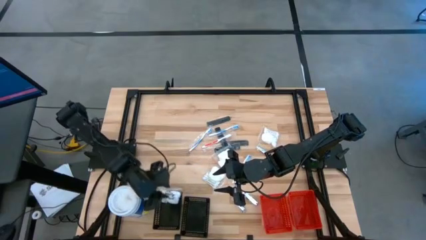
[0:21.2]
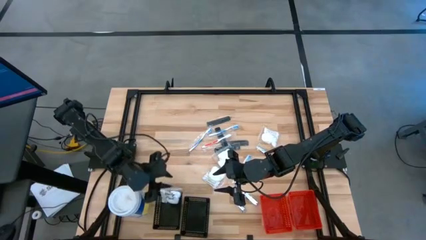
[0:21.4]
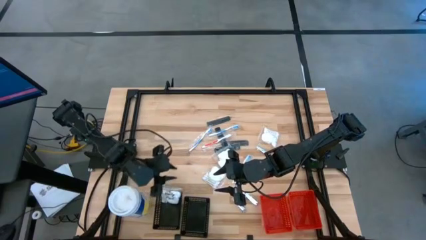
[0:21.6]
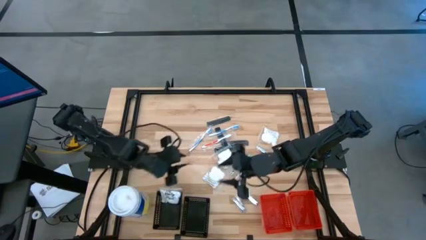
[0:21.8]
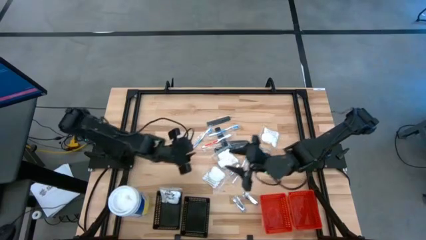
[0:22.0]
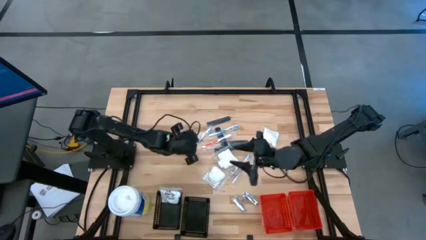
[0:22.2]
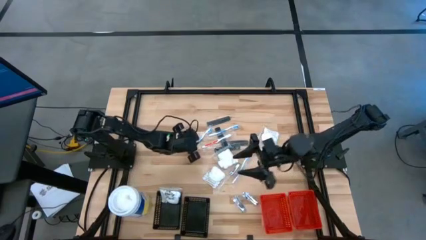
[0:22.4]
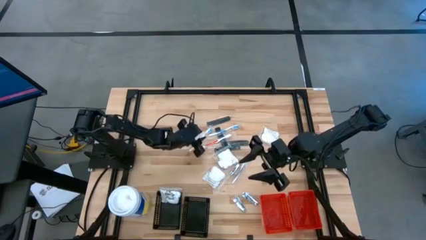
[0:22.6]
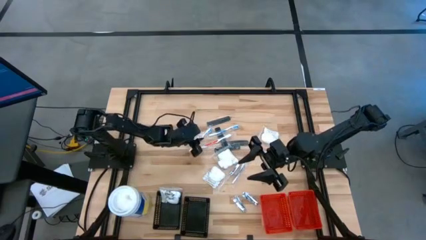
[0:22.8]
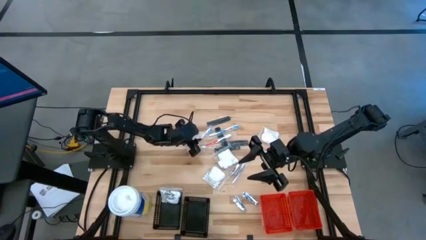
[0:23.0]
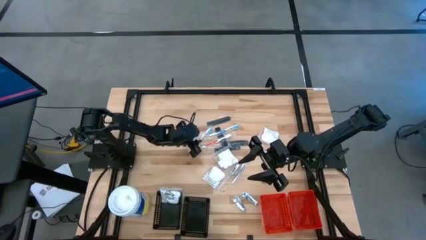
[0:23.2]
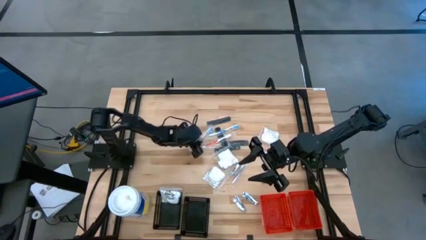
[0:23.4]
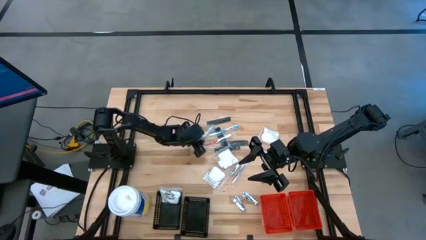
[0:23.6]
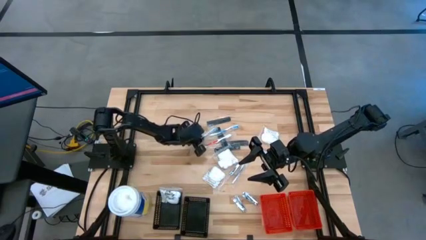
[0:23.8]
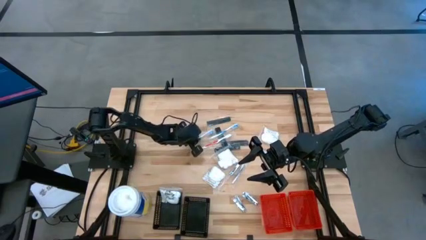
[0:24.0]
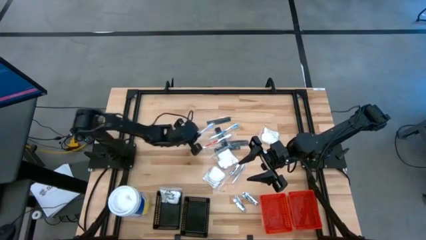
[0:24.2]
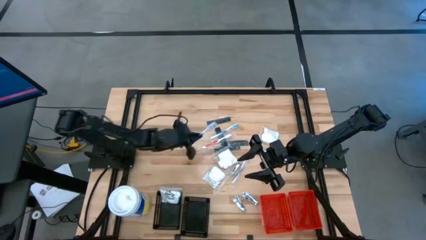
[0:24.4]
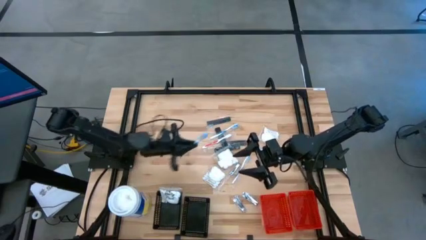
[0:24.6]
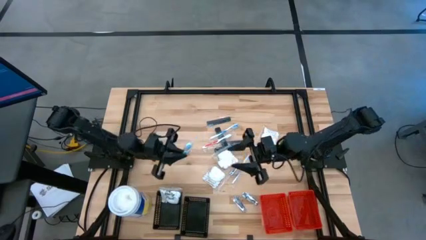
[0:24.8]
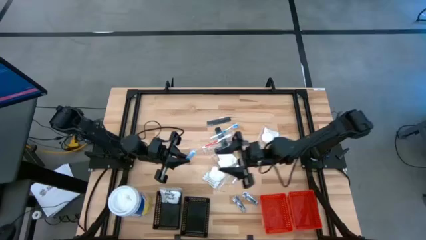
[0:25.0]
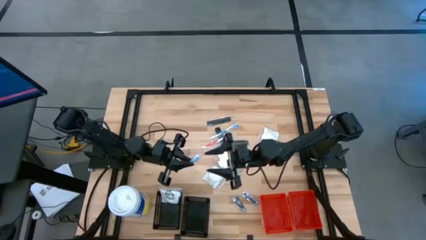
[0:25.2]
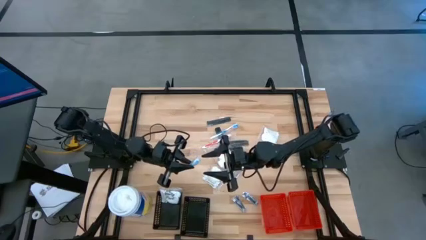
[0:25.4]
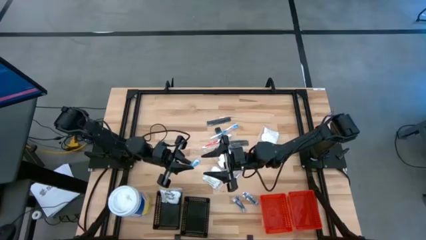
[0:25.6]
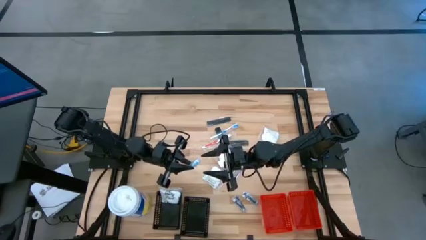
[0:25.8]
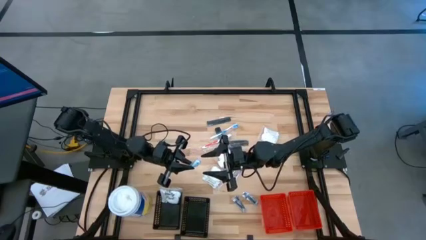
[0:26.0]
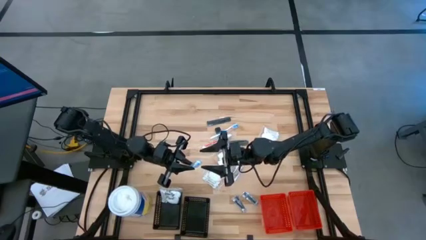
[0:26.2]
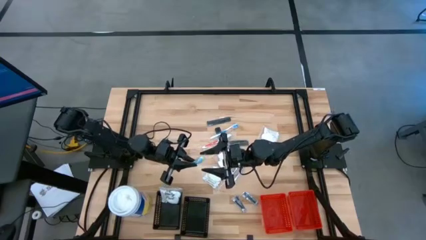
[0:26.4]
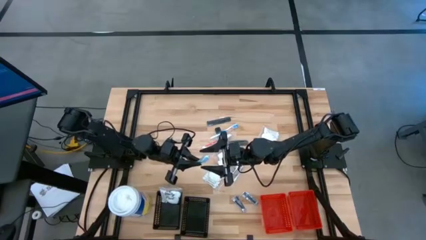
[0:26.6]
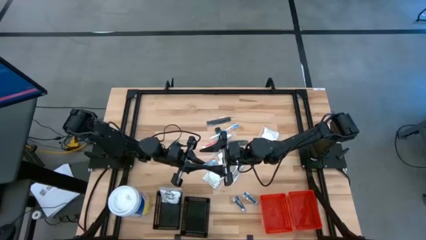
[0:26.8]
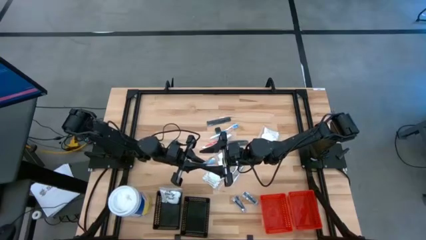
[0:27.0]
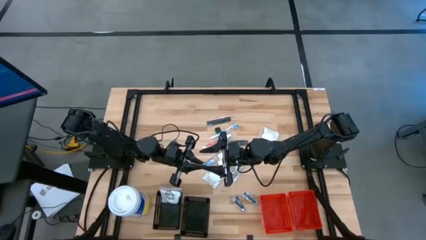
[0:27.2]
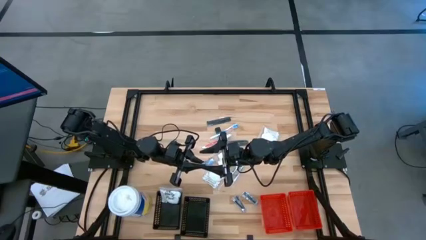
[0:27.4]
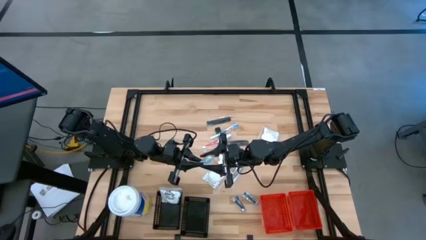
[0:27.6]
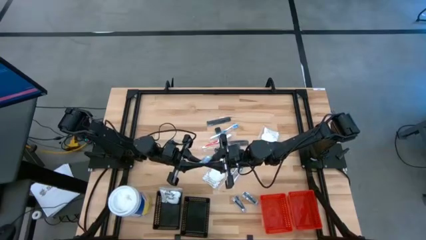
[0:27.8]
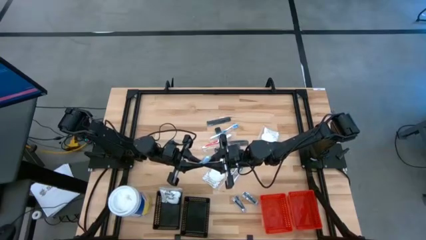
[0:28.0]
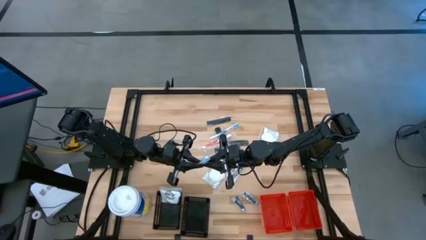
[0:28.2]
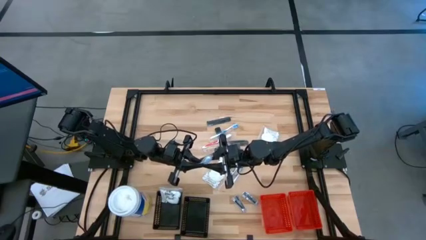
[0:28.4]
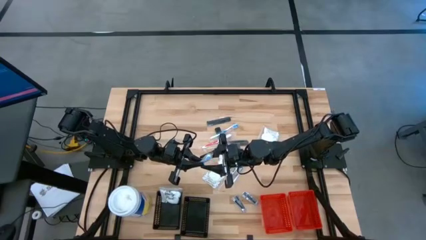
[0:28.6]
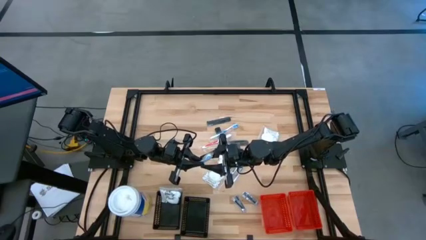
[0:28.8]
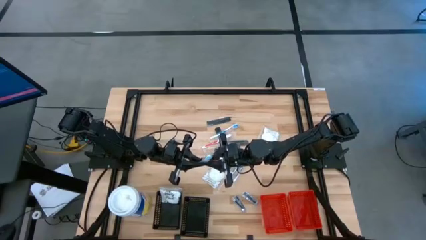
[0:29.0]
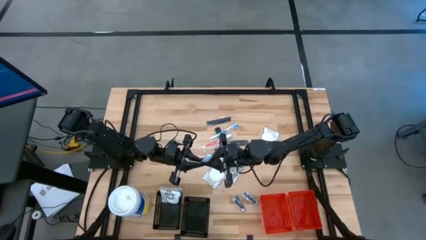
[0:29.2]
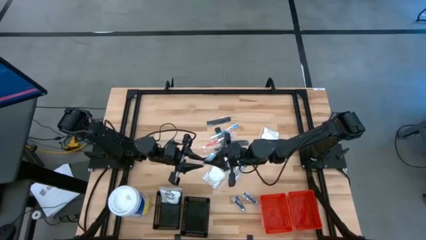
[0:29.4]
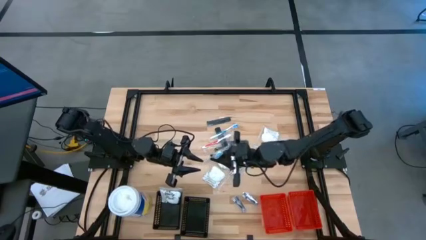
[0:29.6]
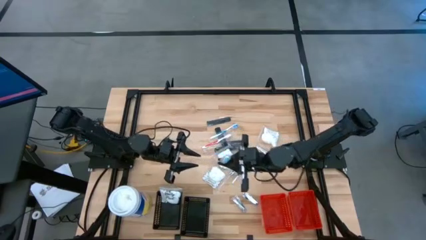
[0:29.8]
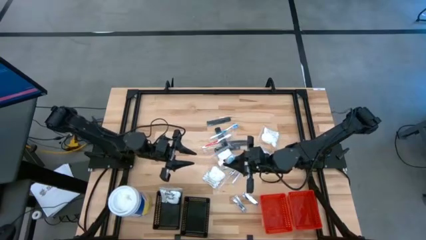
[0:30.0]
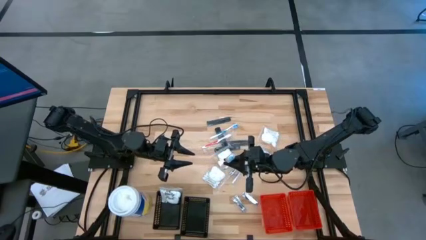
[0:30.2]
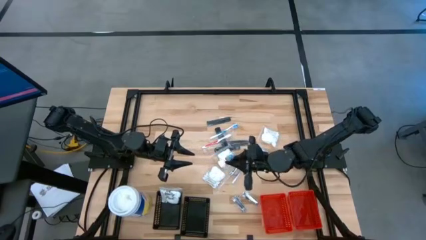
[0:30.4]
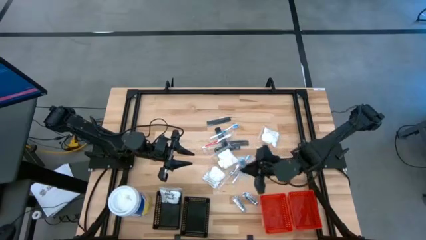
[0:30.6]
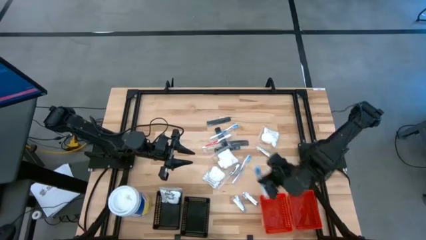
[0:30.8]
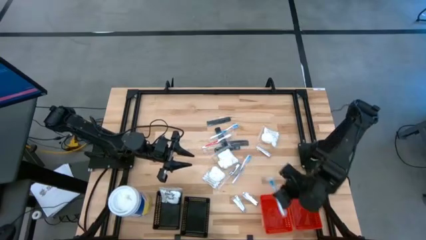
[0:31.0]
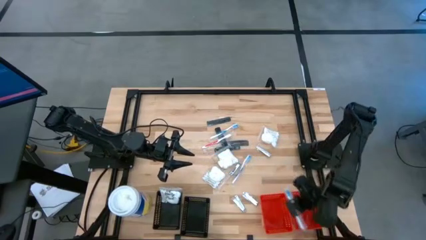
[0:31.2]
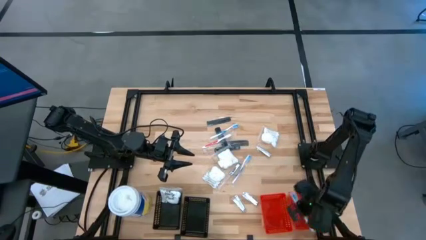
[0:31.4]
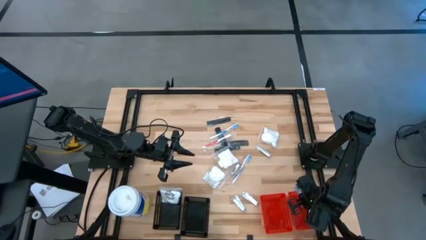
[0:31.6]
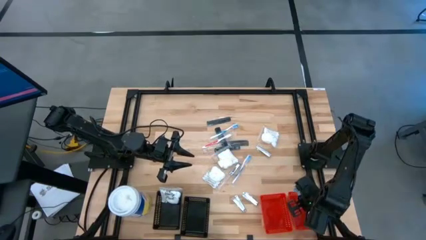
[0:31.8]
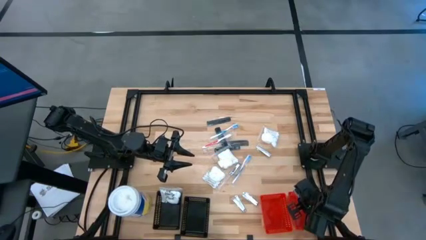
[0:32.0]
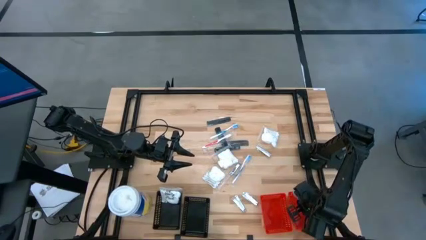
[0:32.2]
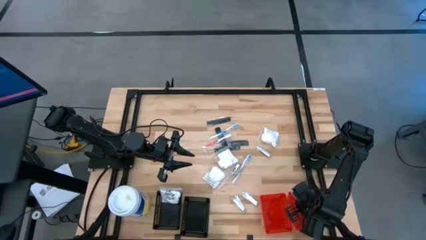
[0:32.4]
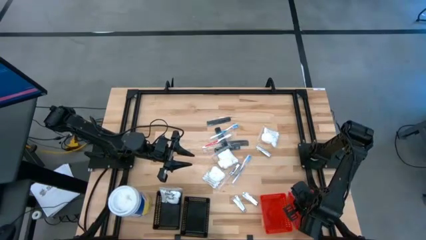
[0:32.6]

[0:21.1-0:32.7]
Task: Pick & Place Travel size toiletries
Put the blue toothbrush into the right red bin
